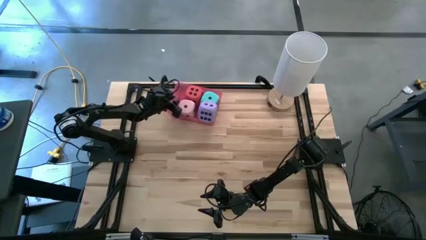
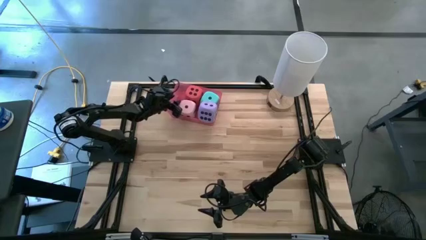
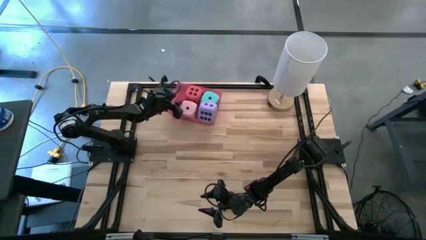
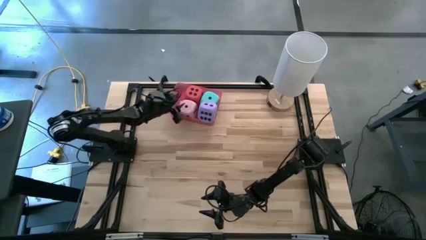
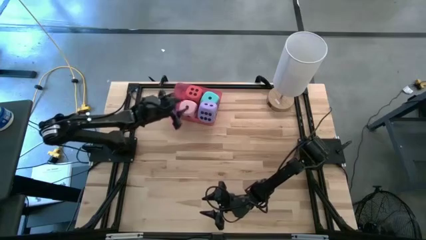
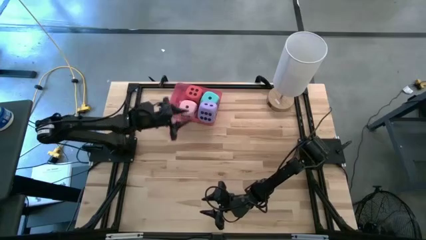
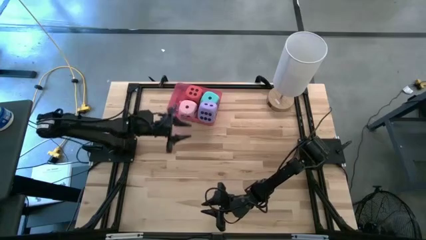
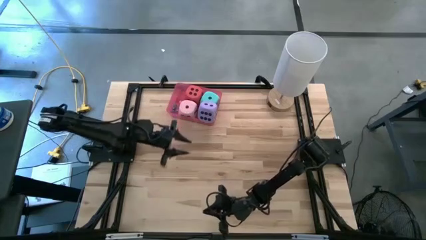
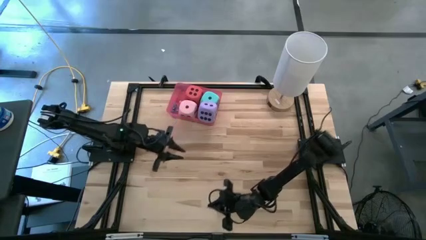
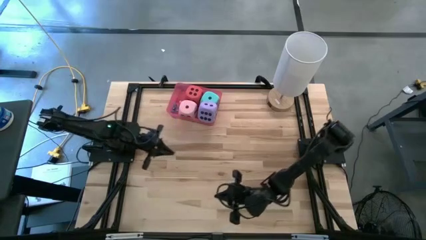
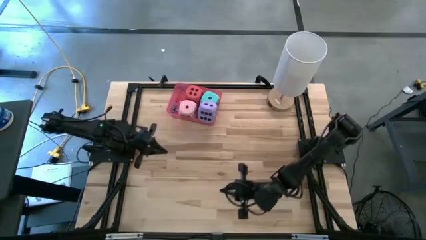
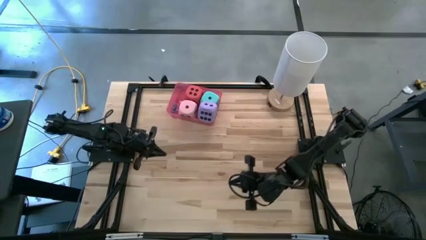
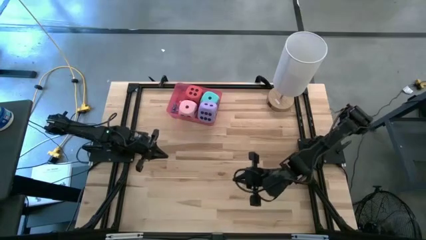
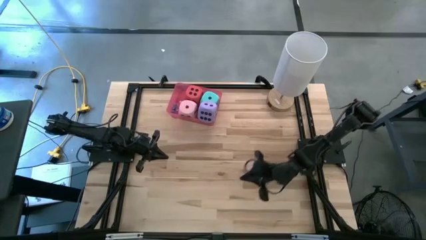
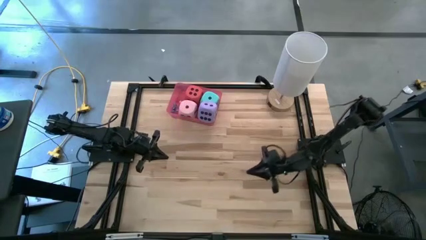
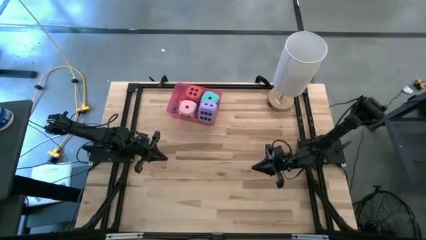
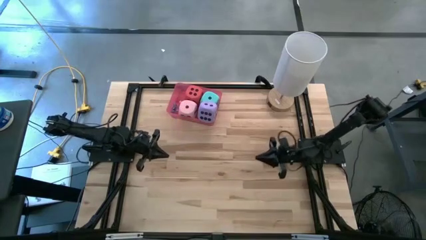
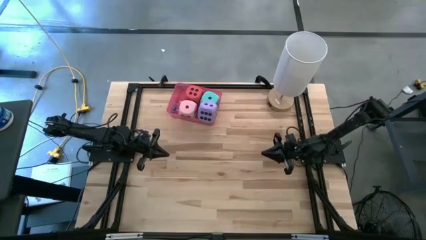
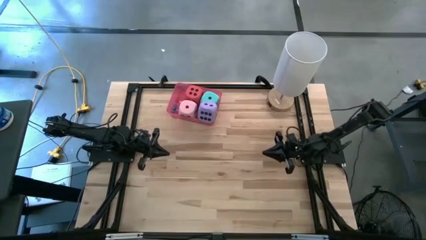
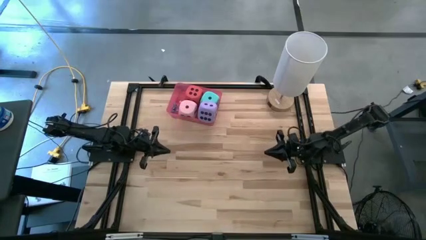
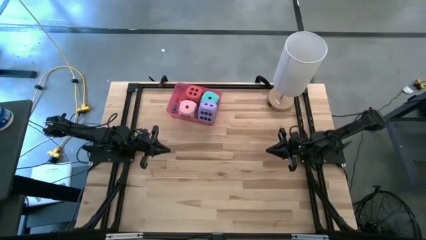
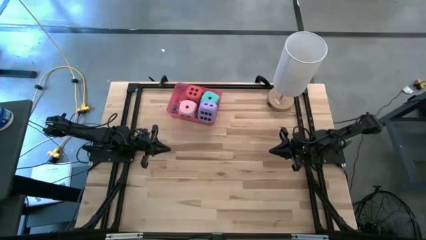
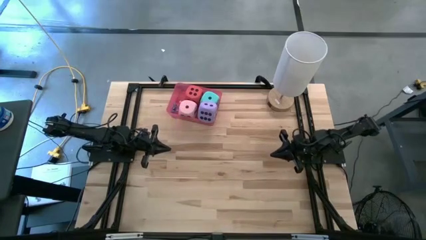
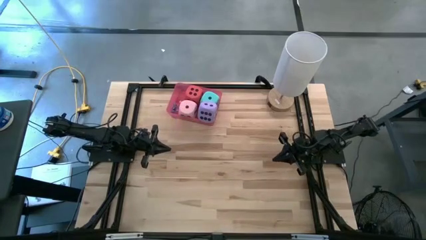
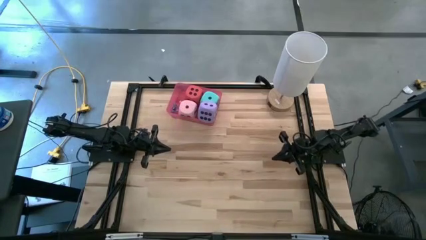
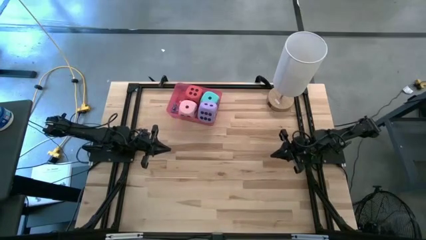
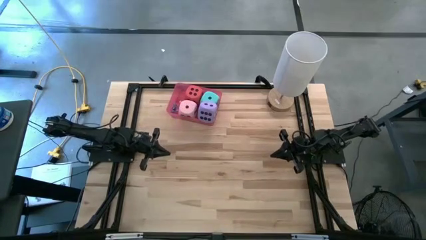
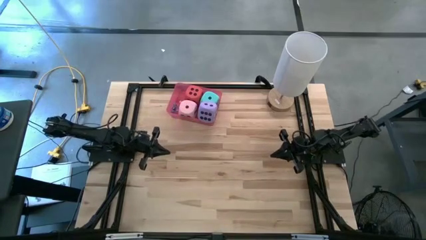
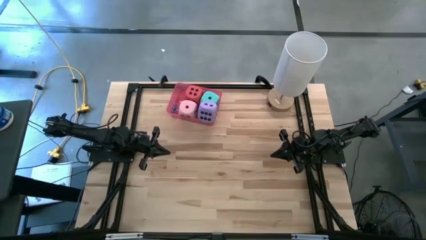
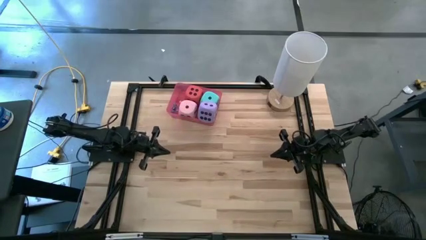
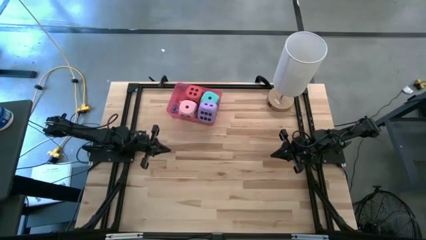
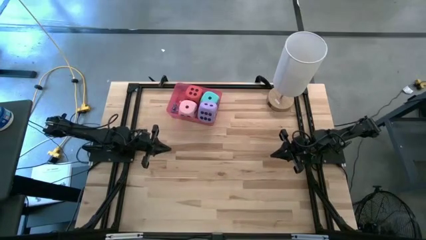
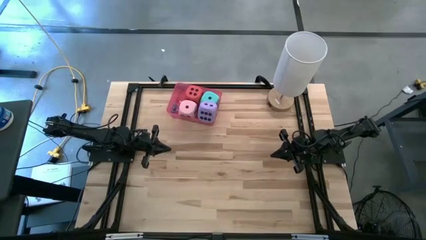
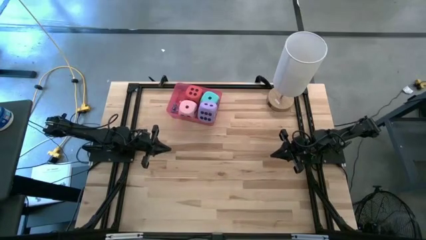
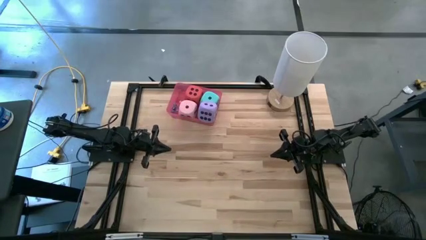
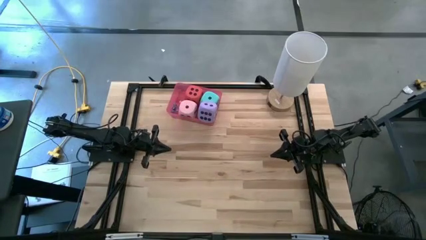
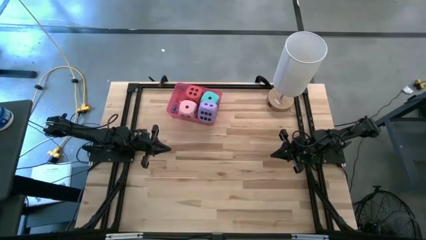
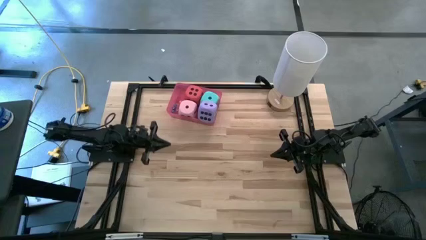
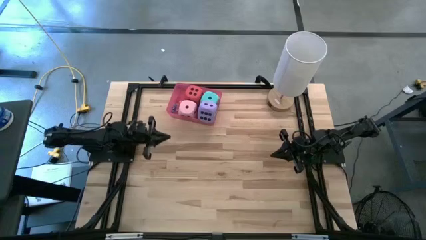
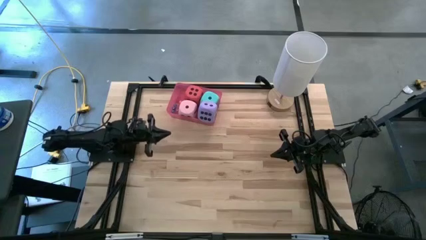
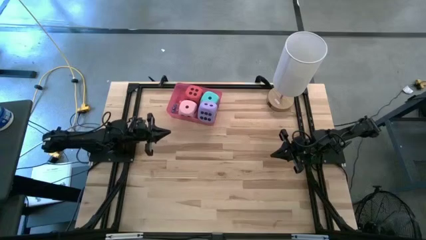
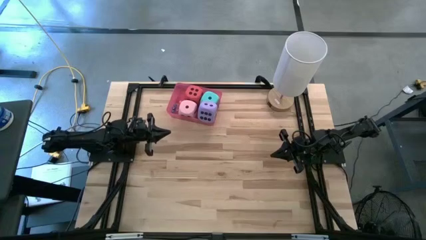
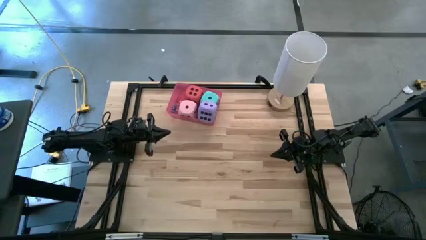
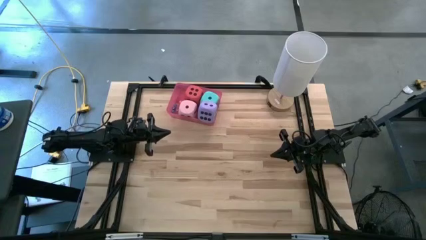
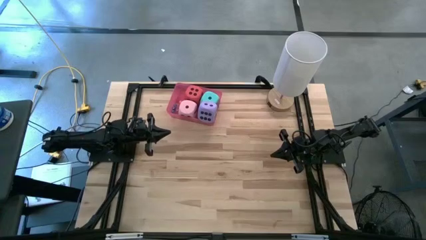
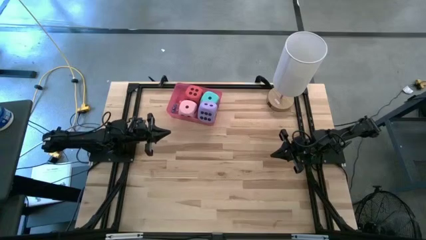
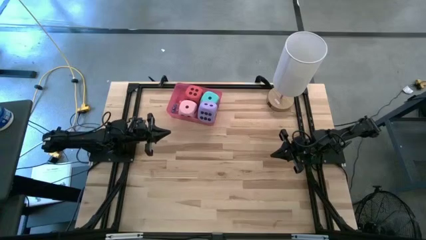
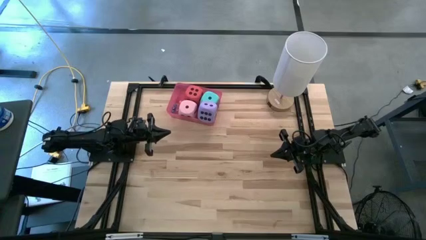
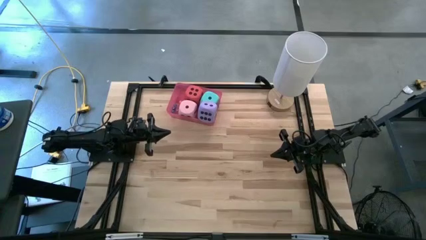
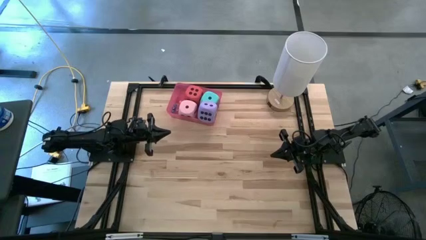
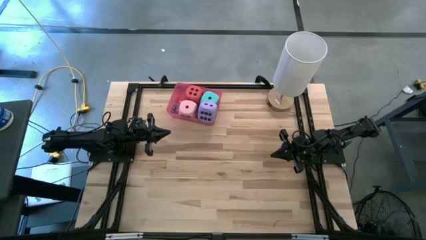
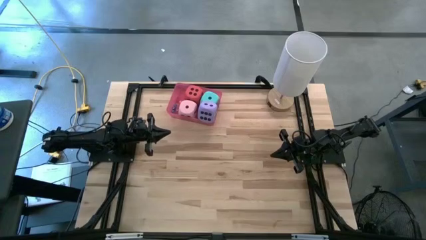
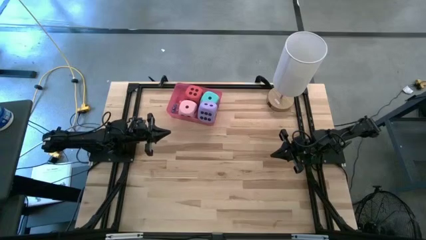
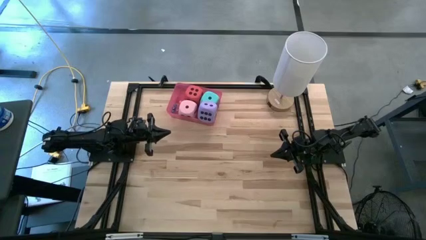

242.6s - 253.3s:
Task: Pick & Place Dice
Return to Home Position
